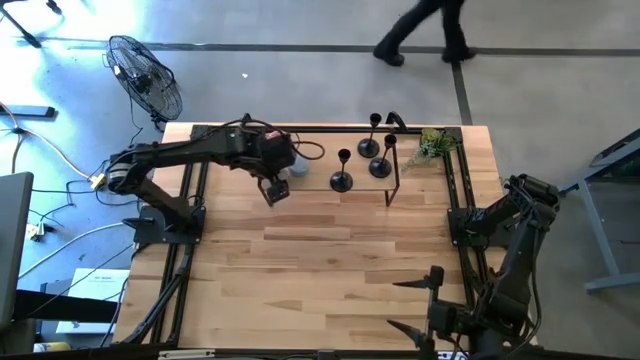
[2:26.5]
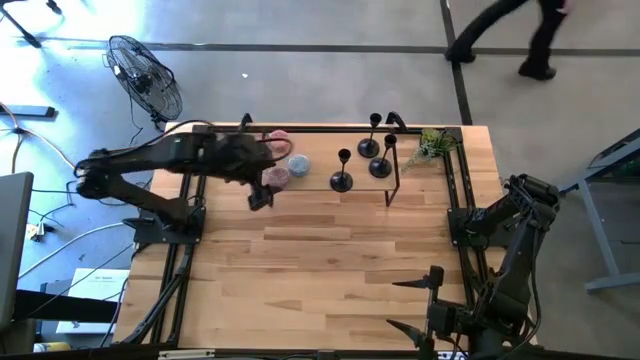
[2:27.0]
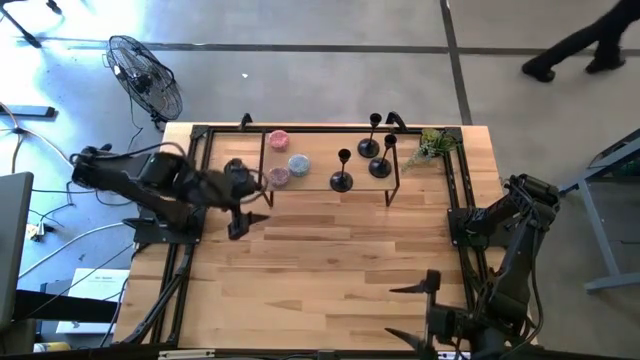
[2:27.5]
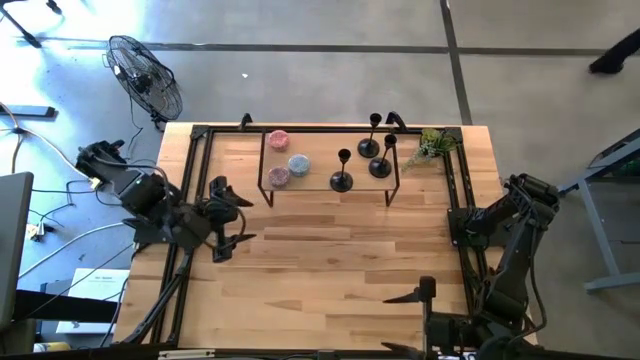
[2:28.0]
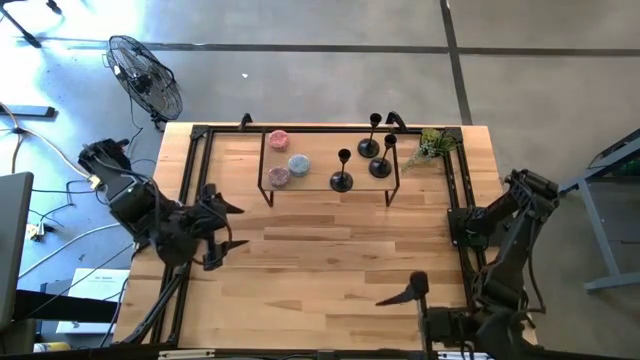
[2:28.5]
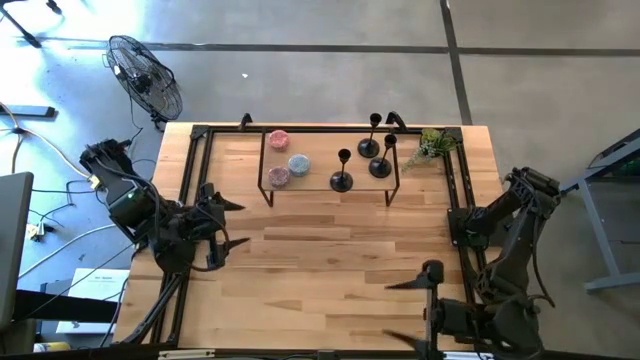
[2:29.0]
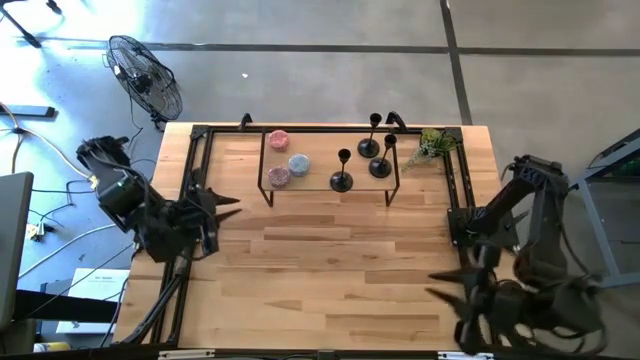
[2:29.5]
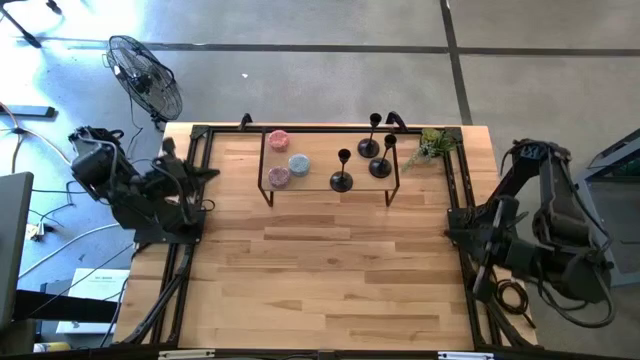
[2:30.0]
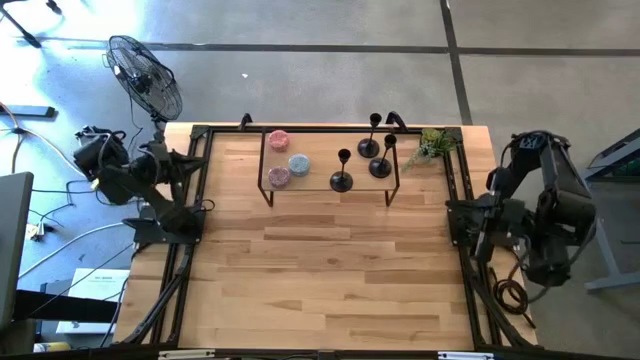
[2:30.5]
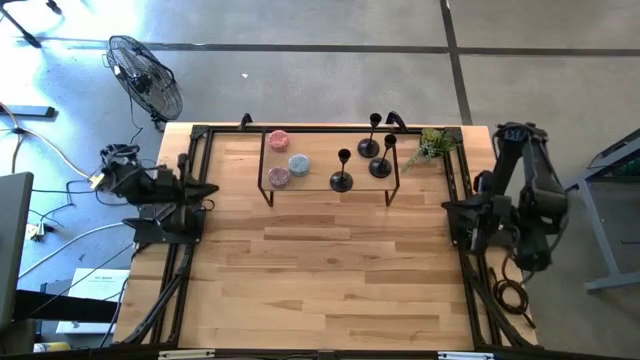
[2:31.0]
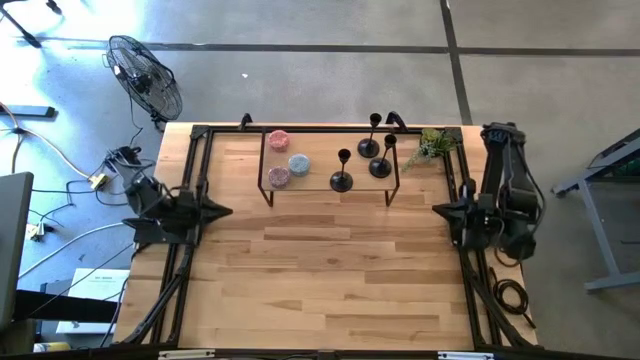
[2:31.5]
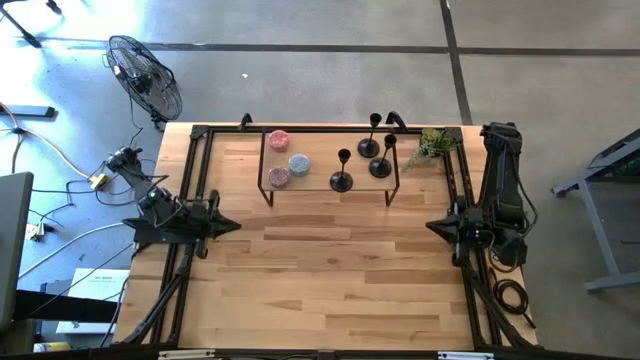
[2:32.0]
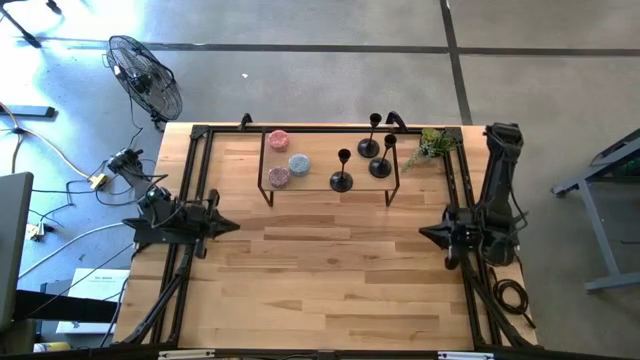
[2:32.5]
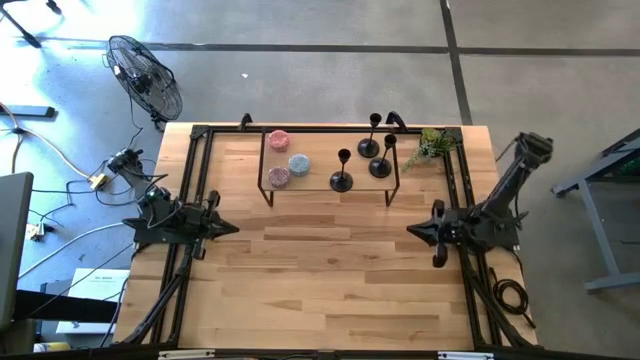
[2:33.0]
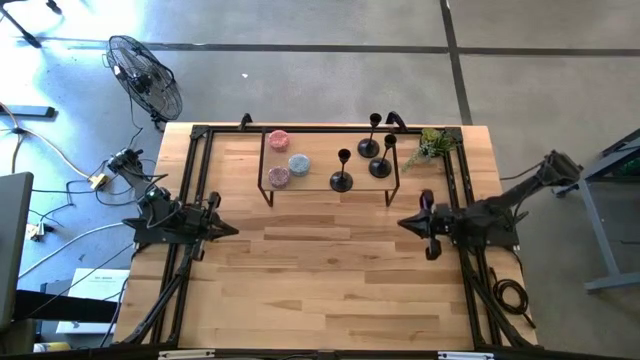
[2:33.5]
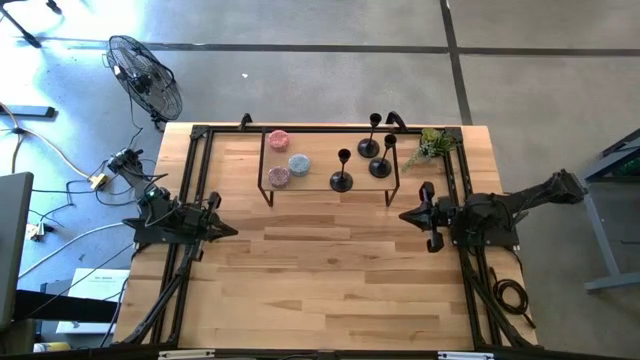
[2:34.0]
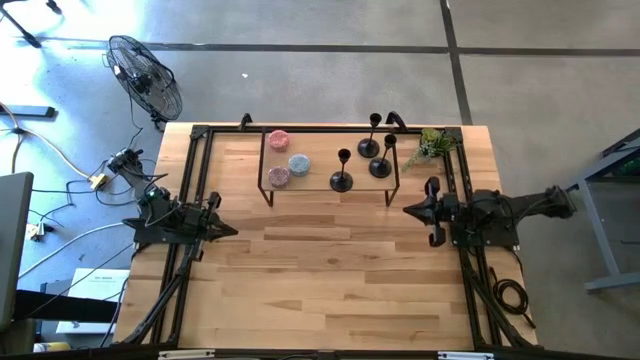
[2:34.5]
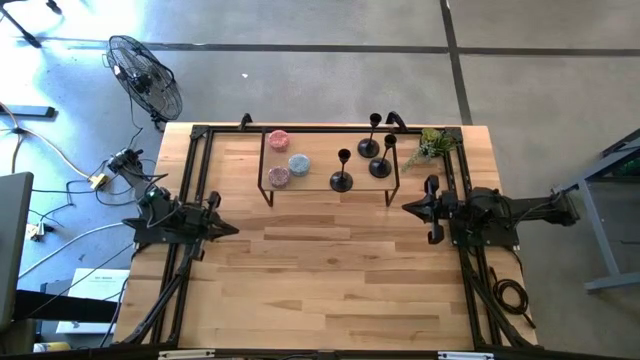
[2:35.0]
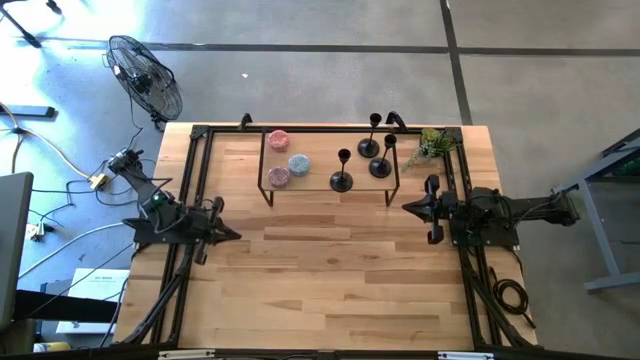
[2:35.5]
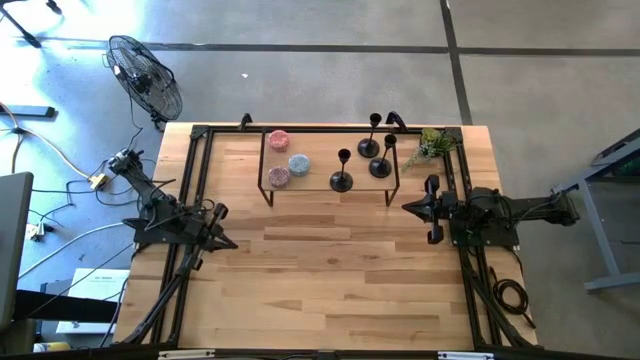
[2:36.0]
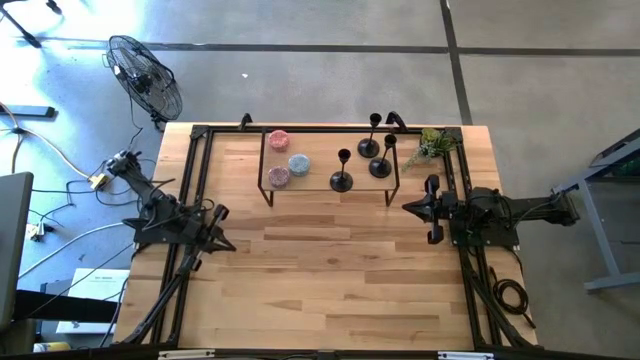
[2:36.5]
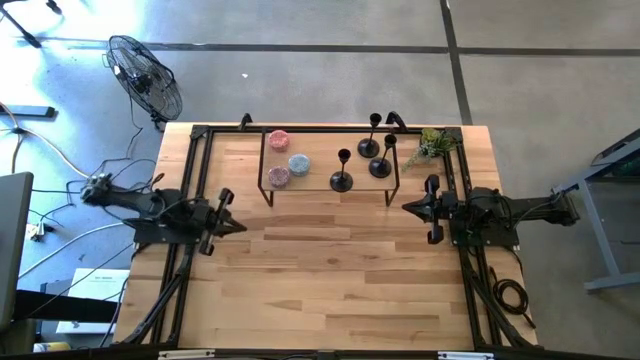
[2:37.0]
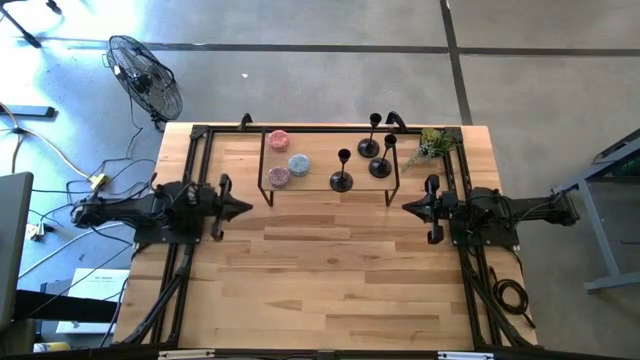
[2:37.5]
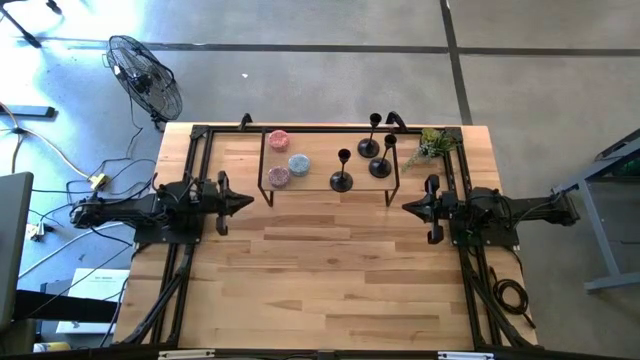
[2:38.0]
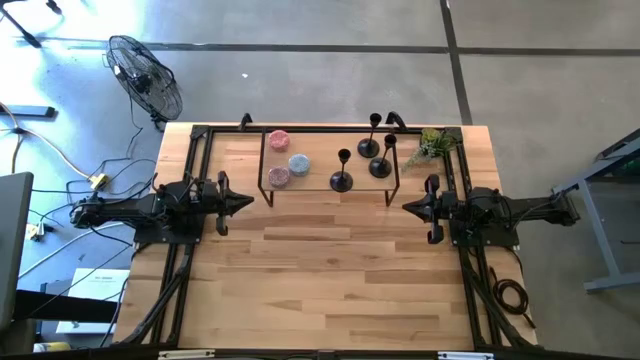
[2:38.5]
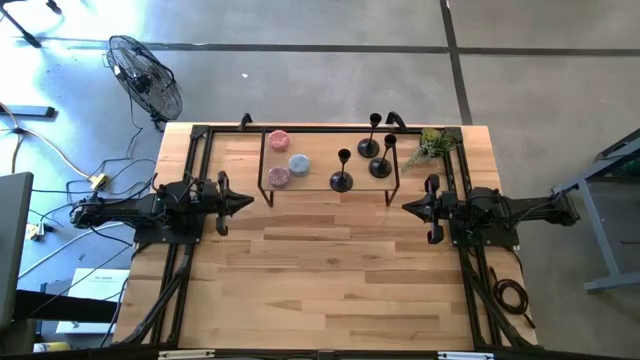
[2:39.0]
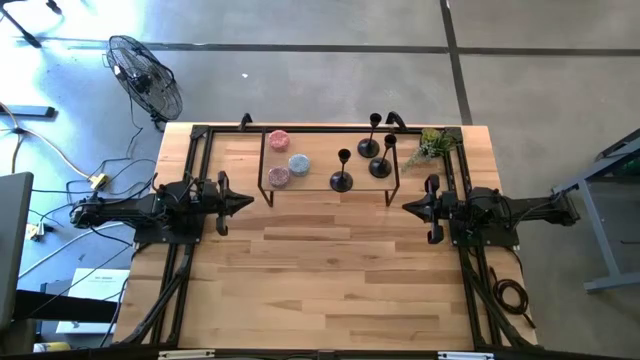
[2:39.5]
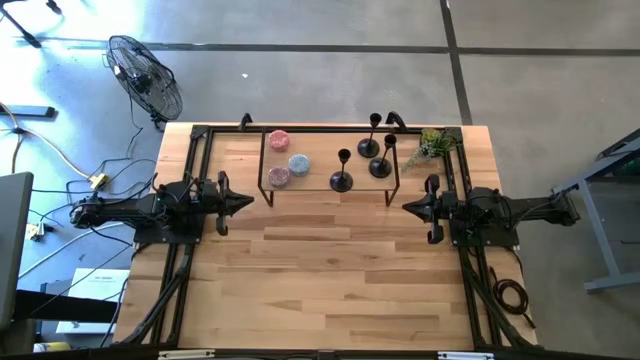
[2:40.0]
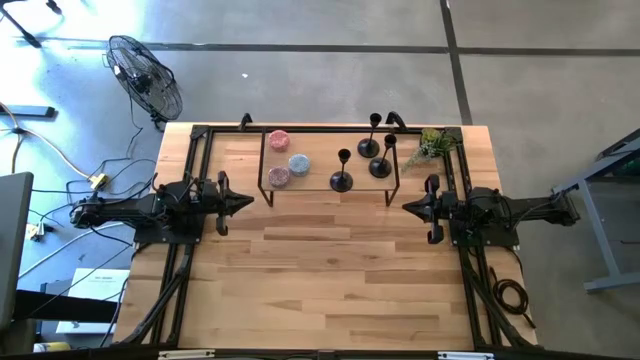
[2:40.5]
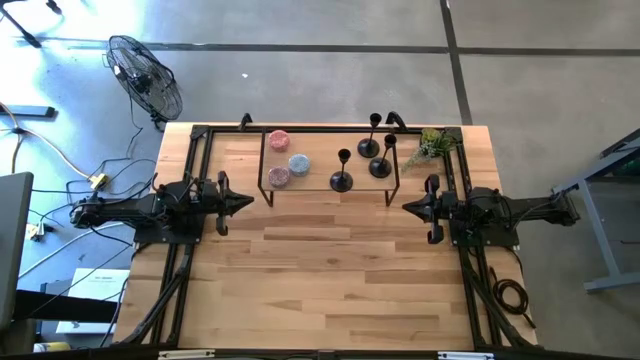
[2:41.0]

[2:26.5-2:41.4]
Task: Pick & Place candle stick holders
Return to Home Position
